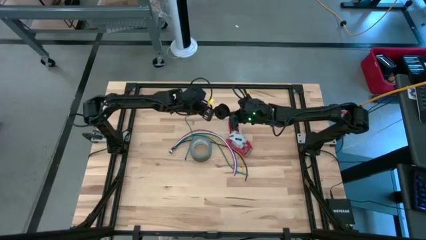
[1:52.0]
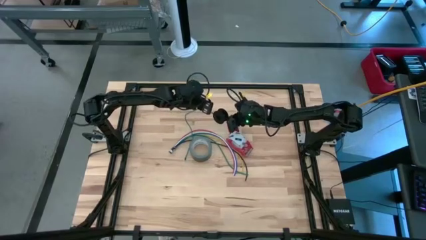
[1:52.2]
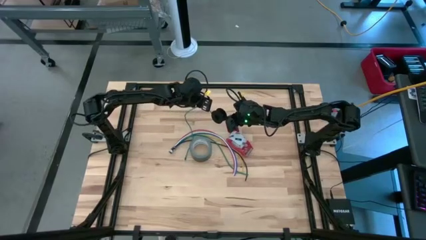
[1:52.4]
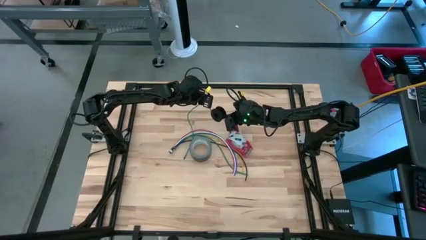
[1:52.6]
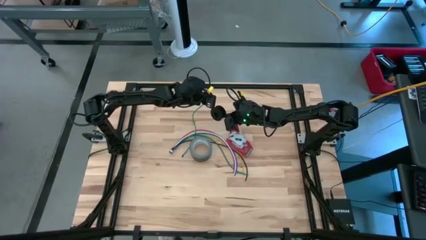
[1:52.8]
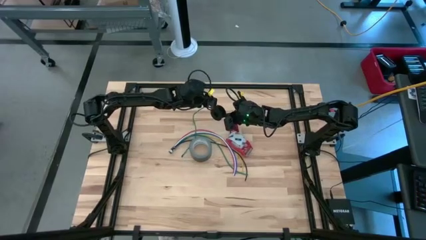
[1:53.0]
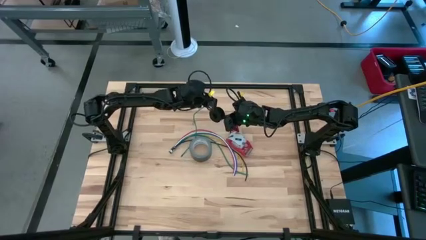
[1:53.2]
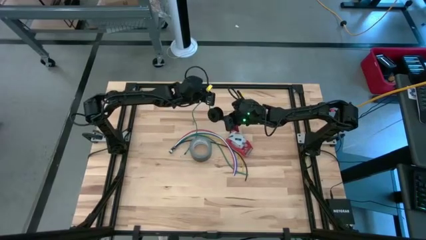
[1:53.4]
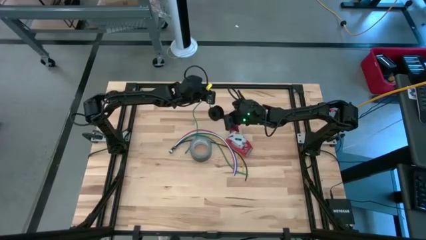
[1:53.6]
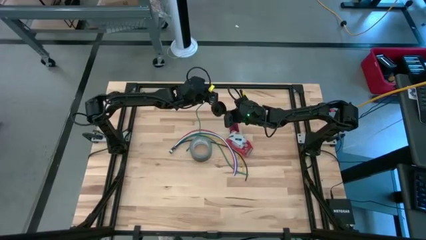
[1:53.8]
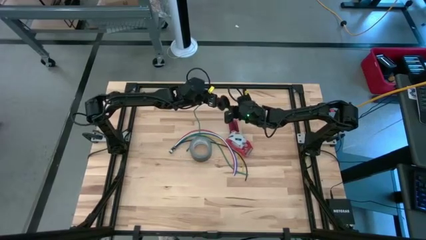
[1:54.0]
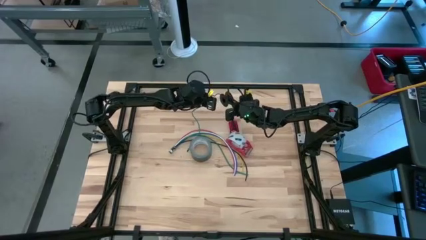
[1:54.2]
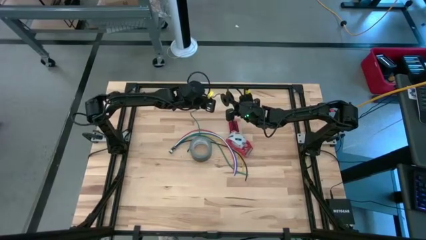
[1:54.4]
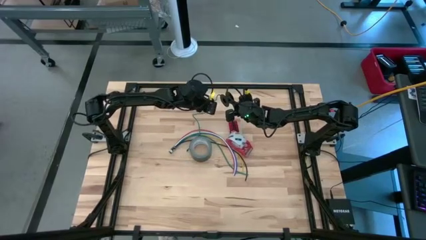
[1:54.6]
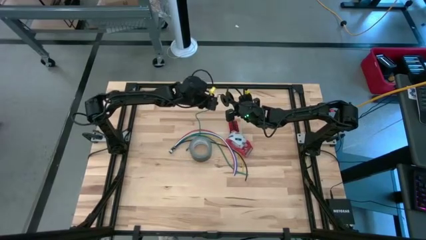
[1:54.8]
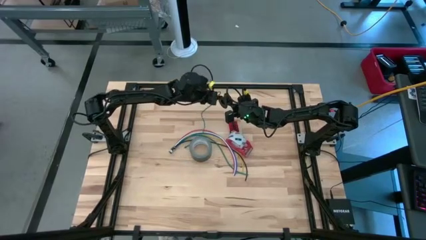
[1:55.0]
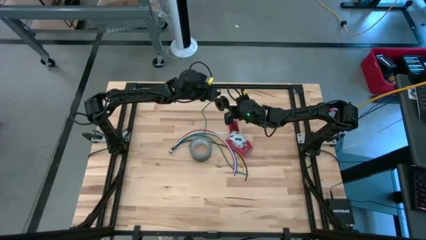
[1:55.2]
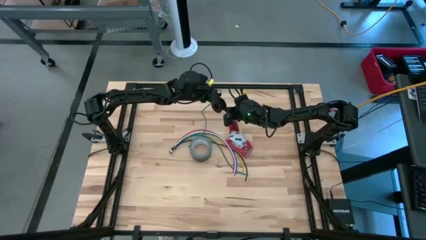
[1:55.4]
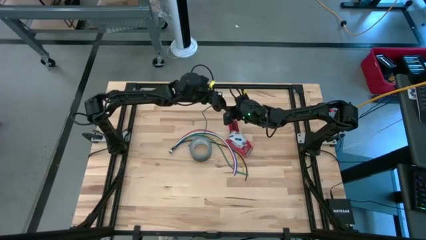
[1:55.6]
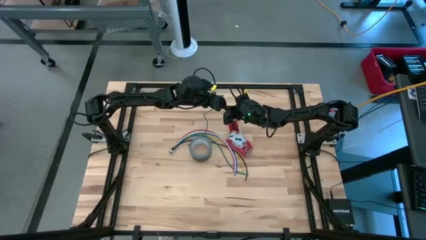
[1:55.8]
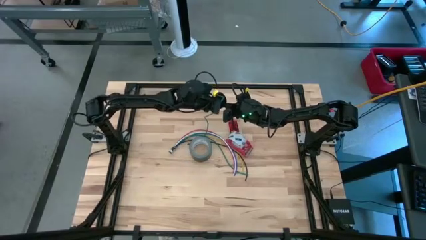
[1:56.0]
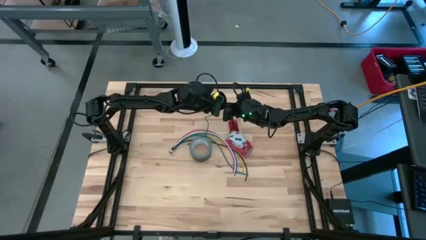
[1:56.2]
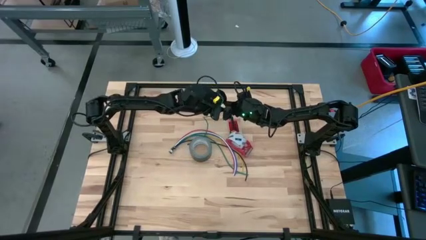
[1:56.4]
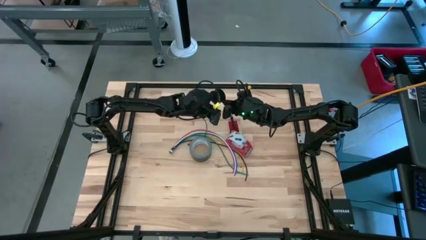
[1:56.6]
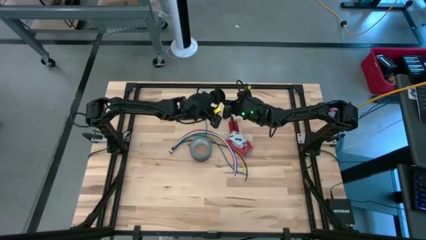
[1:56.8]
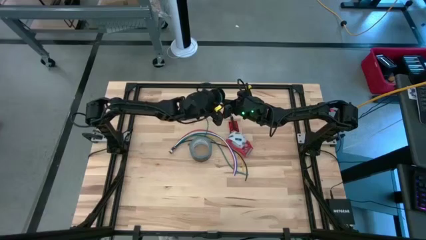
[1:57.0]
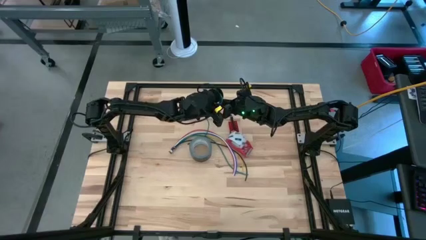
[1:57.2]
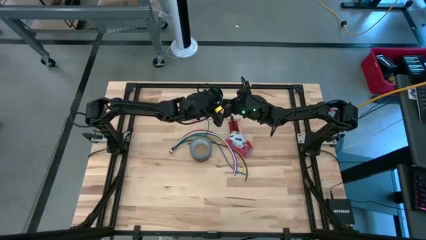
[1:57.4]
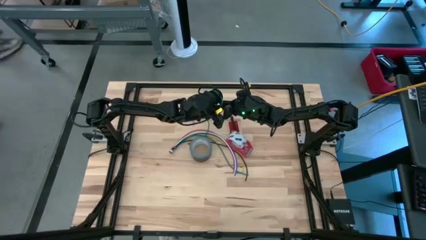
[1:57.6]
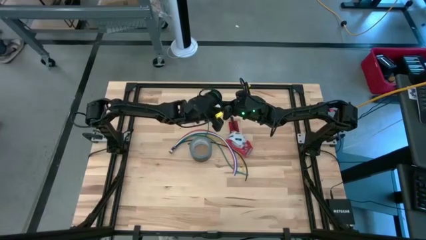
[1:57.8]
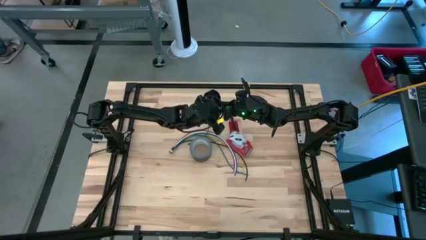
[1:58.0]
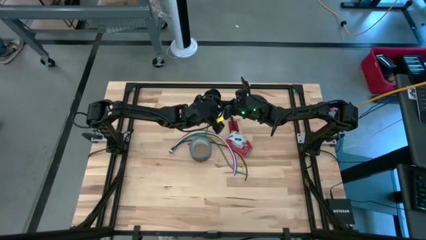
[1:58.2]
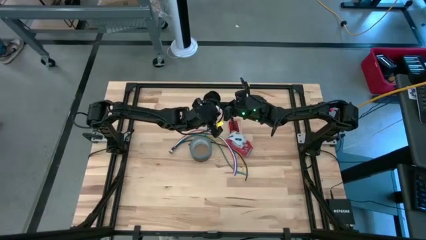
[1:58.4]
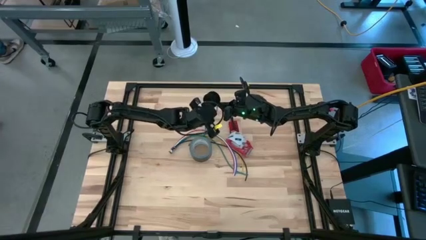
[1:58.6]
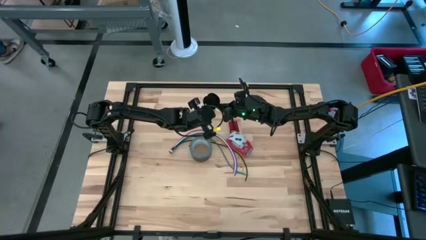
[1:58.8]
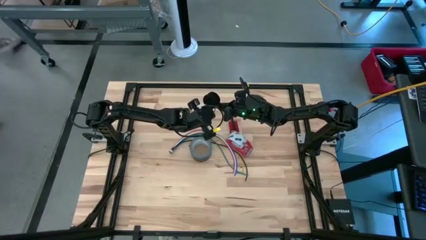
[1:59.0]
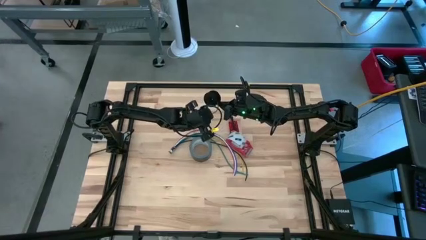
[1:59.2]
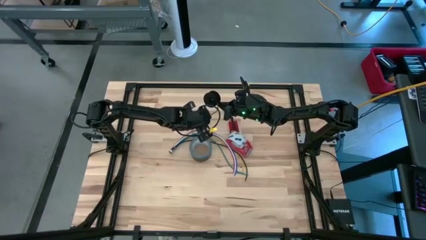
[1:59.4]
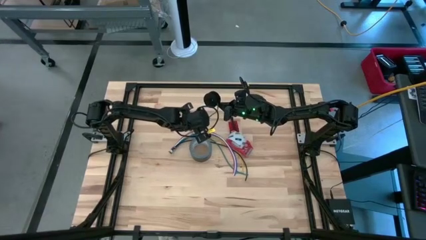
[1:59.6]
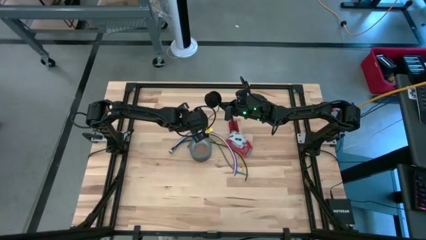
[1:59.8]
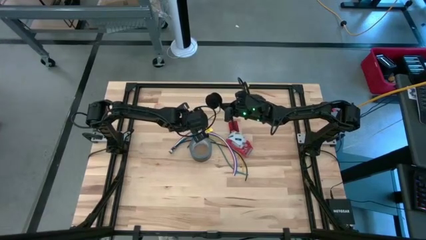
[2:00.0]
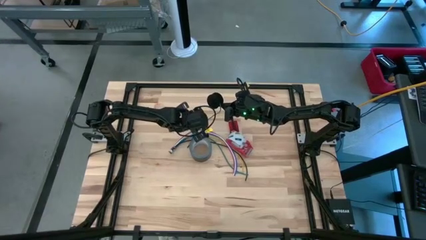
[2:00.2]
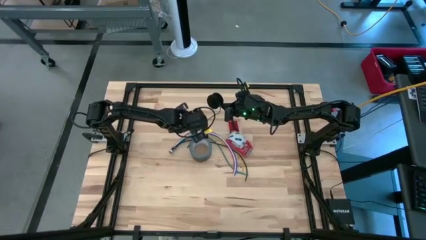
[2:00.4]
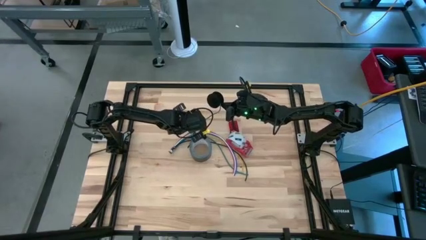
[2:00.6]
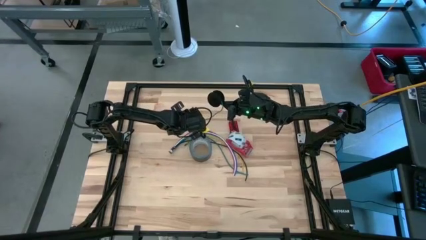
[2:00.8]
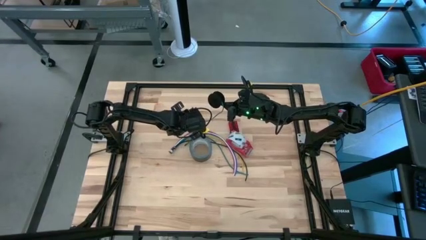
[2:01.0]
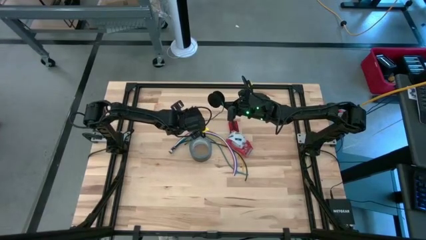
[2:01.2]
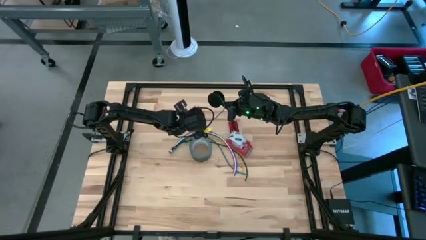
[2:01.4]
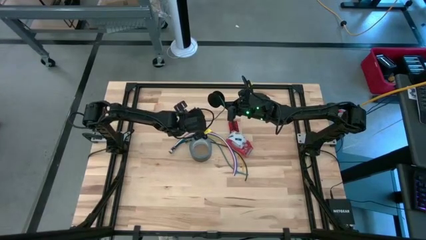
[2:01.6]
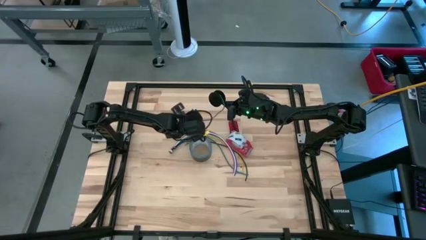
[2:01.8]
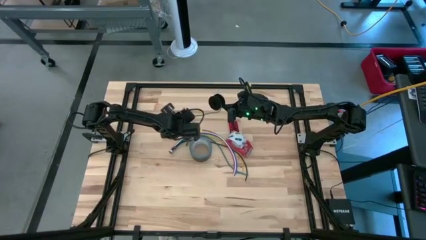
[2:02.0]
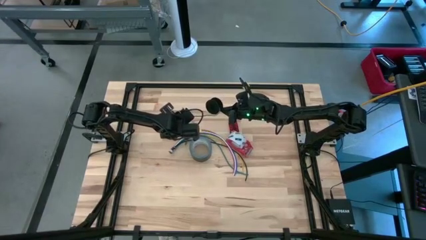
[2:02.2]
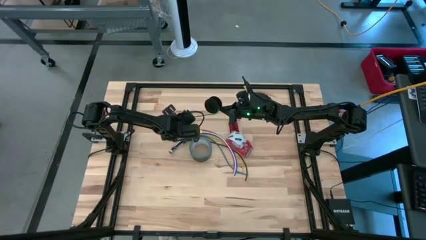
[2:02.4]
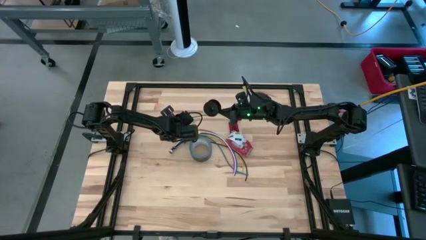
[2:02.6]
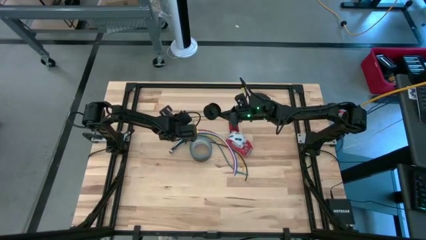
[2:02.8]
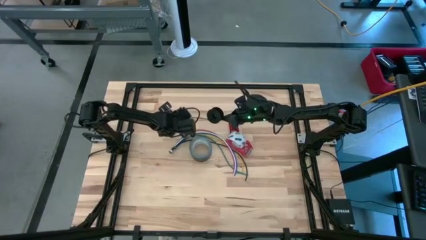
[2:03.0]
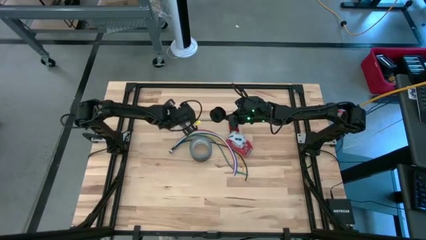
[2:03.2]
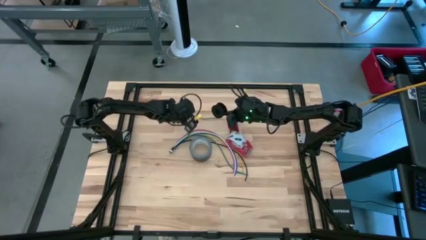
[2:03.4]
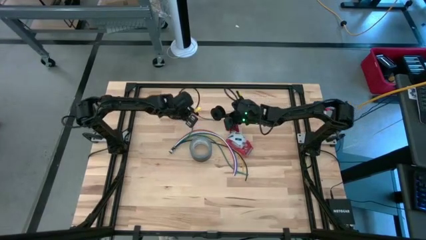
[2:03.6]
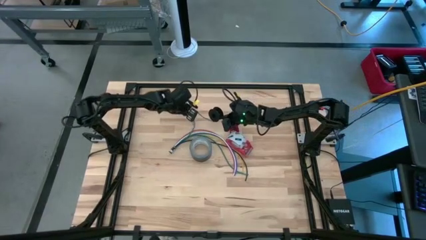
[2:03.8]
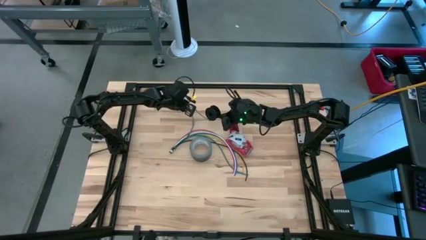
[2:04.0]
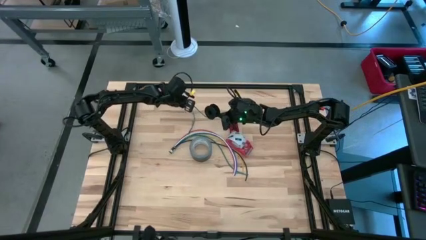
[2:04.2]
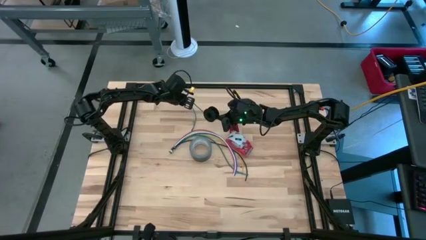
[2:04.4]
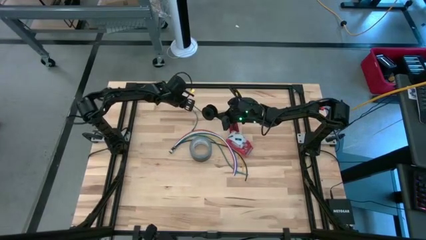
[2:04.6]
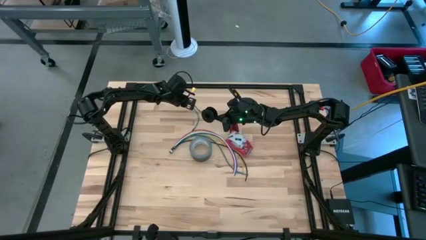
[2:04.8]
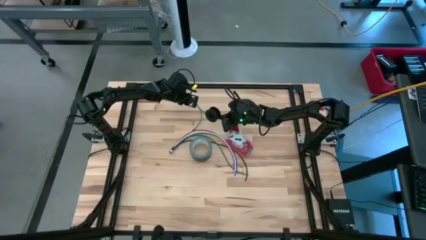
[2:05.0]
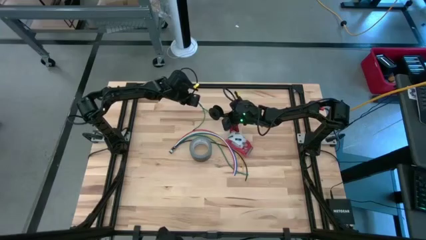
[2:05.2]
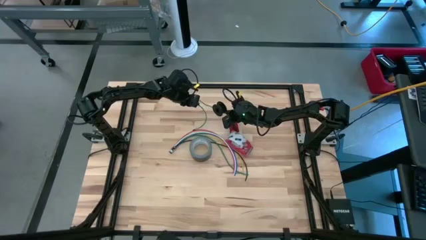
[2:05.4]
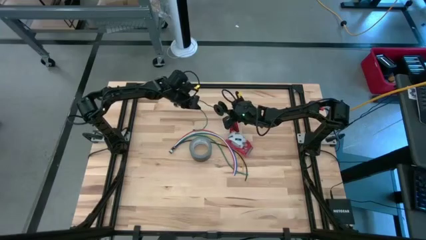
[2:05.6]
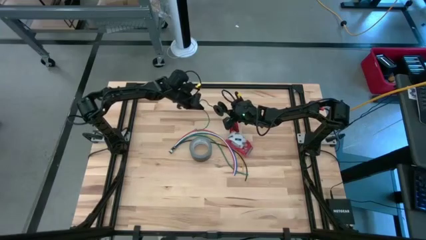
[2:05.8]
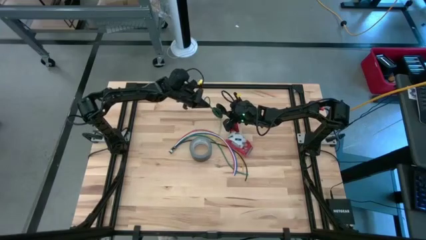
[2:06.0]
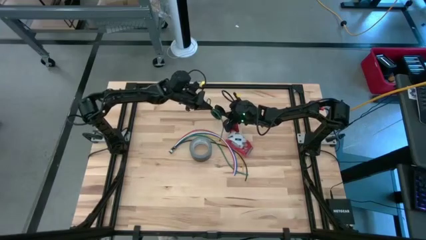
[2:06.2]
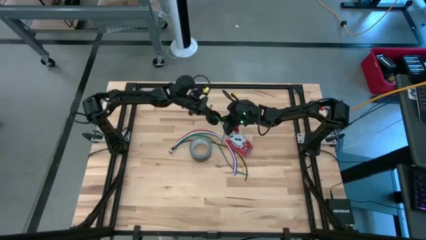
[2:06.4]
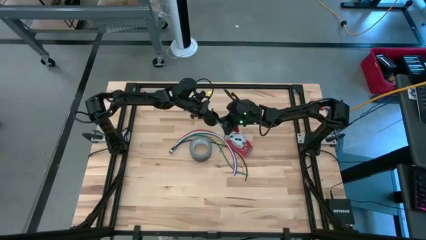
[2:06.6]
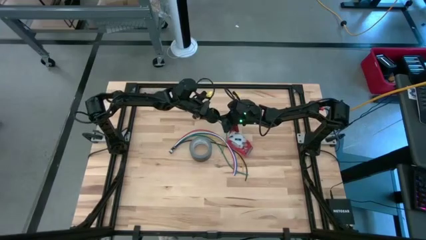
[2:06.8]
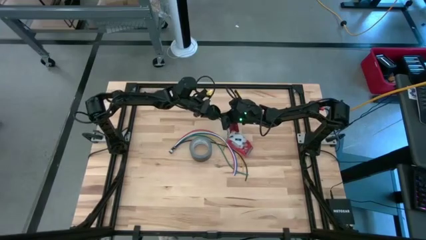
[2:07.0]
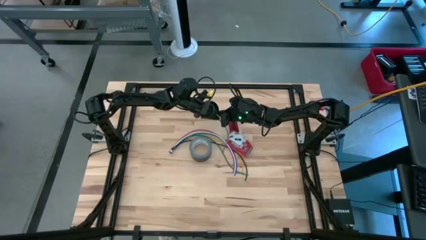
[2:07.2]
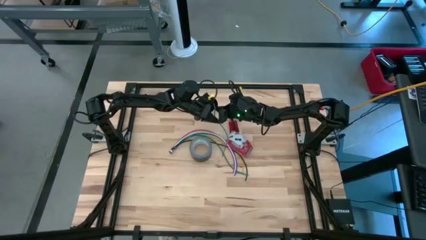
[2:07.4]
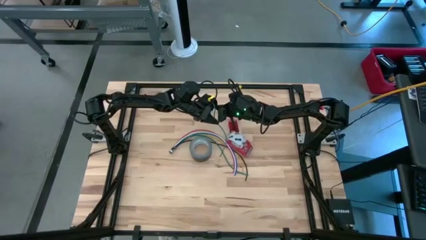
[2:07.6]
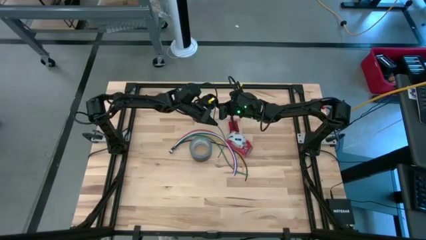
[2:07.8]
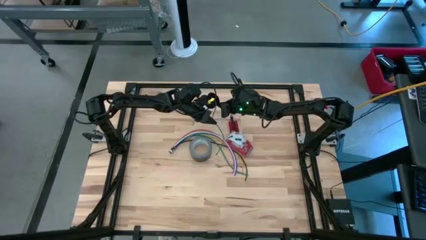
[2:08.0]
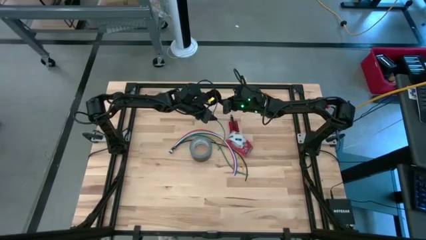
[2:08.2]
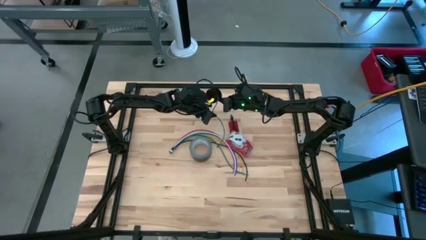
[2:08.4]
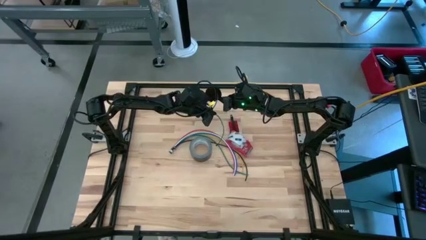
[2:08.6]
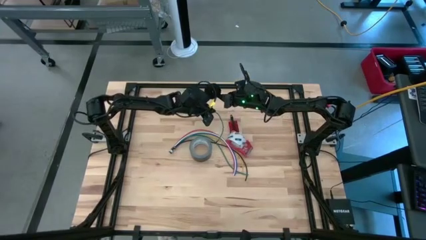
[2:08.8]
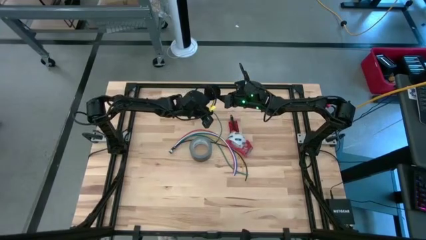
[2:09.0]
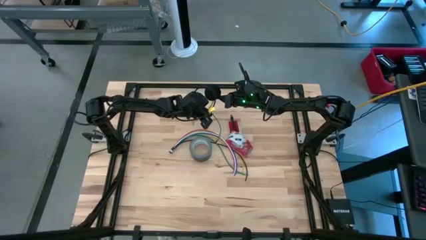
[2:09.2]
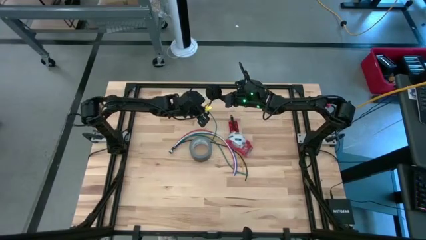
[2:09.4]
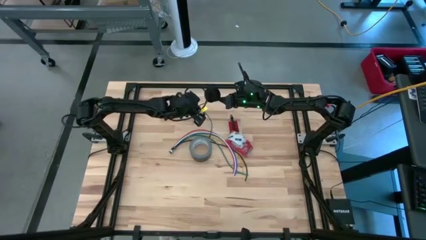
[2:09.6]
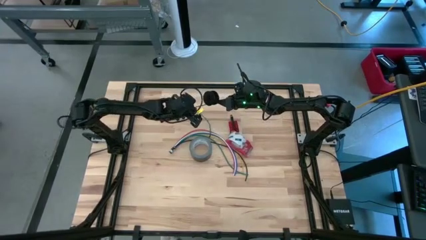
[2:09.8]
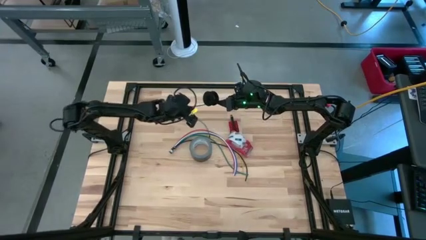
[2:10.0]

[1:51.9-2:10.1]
Task: Coil cords
Coil the green wire onto the black spool
